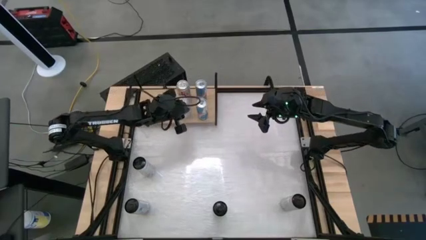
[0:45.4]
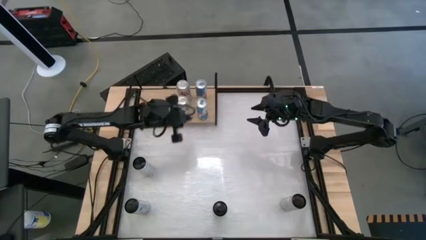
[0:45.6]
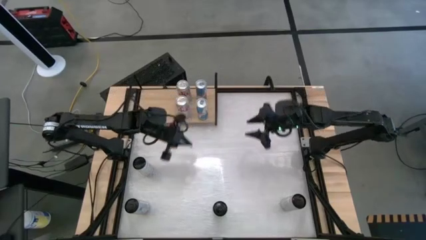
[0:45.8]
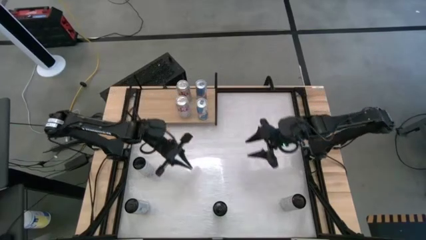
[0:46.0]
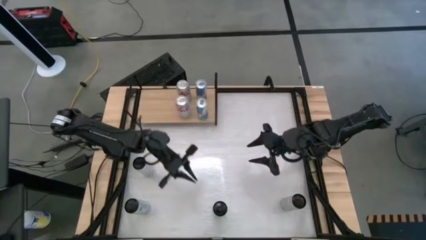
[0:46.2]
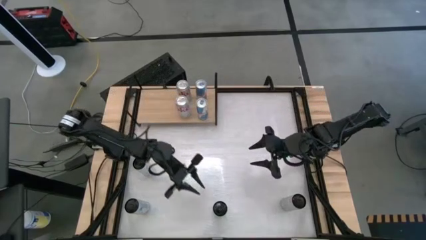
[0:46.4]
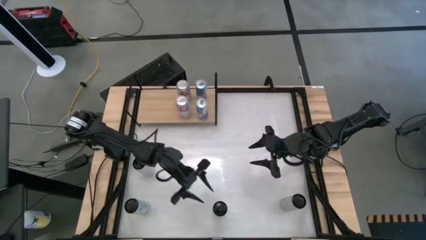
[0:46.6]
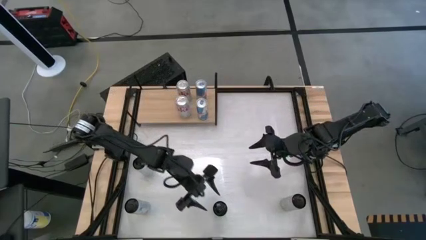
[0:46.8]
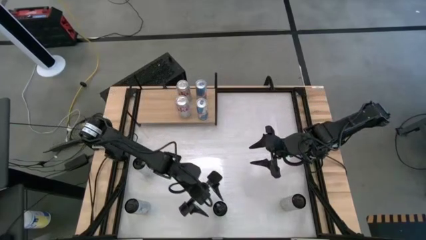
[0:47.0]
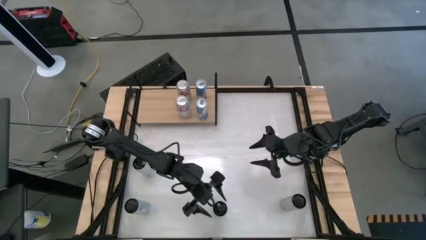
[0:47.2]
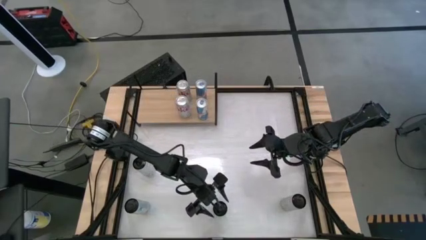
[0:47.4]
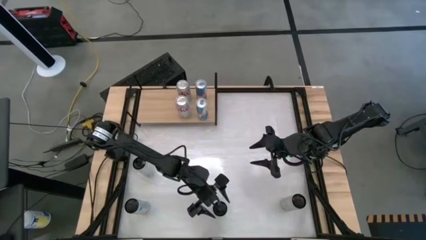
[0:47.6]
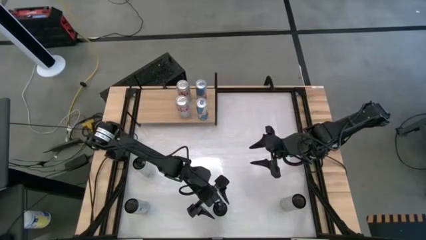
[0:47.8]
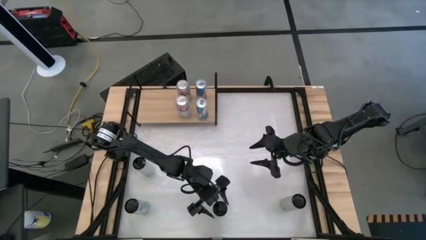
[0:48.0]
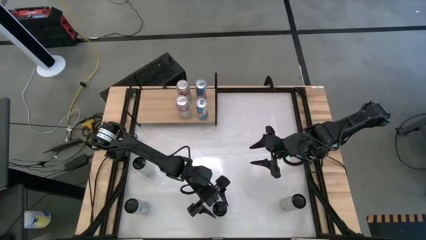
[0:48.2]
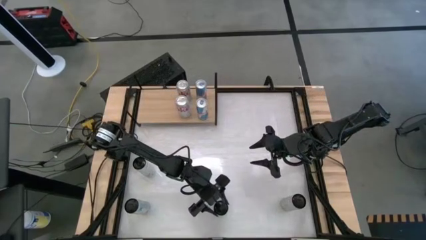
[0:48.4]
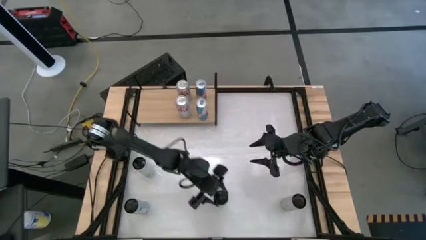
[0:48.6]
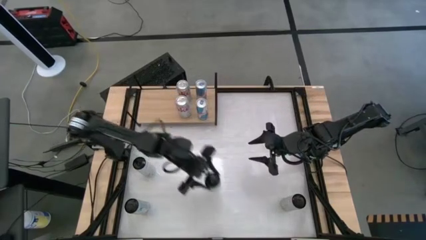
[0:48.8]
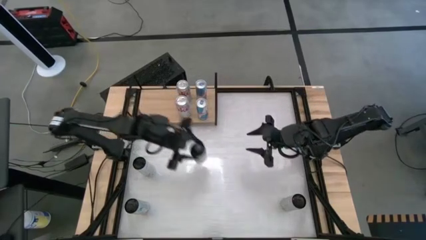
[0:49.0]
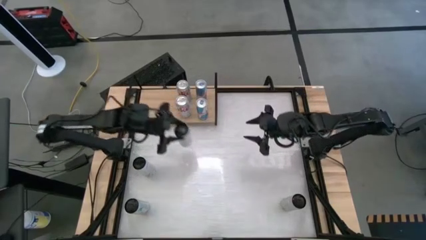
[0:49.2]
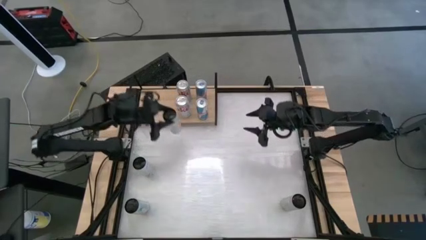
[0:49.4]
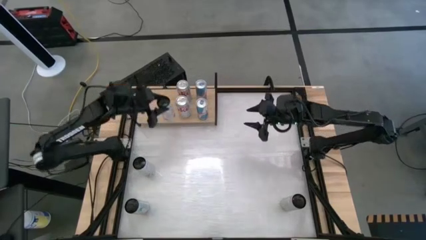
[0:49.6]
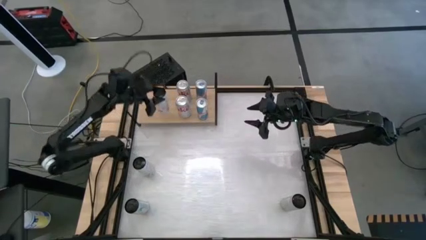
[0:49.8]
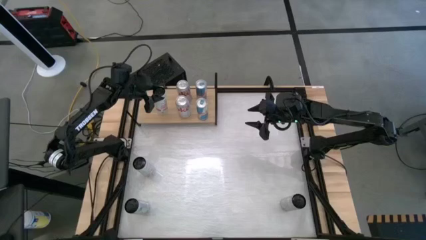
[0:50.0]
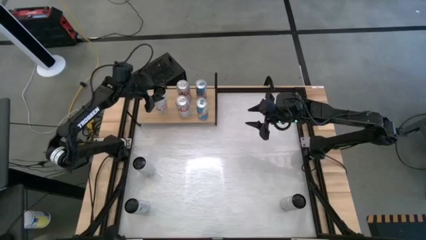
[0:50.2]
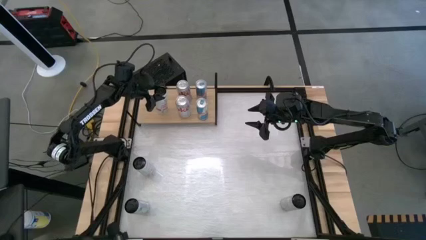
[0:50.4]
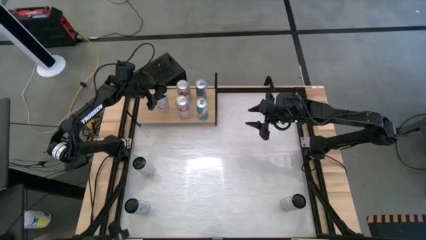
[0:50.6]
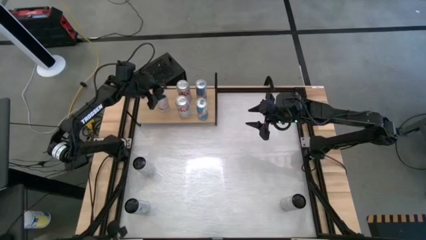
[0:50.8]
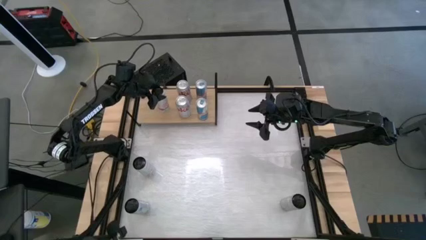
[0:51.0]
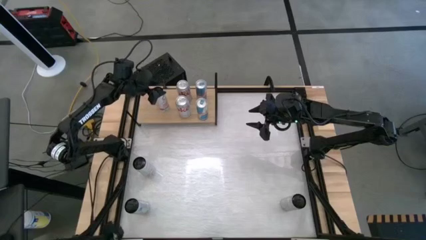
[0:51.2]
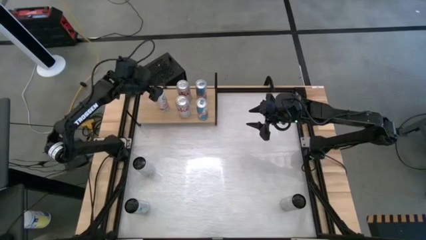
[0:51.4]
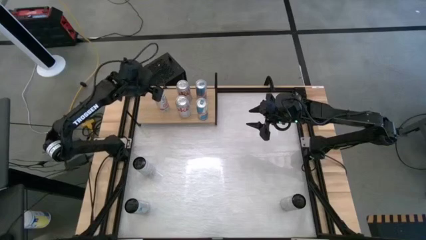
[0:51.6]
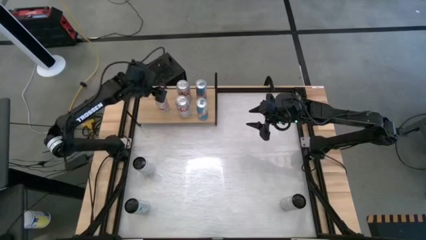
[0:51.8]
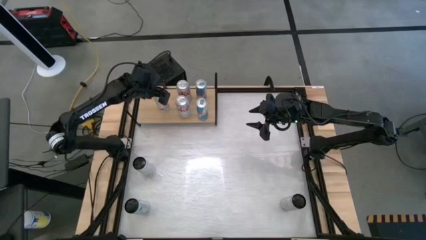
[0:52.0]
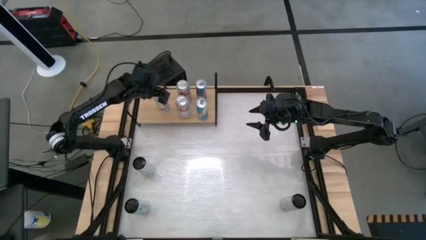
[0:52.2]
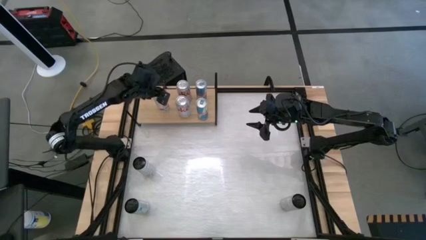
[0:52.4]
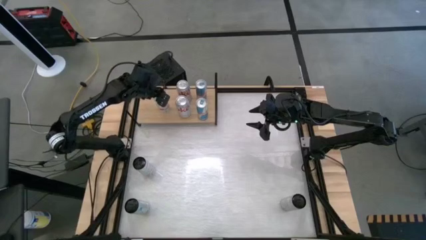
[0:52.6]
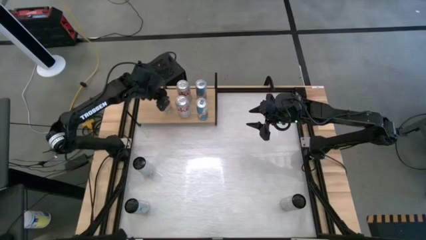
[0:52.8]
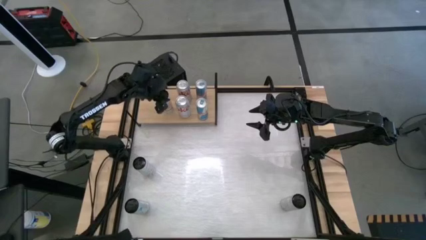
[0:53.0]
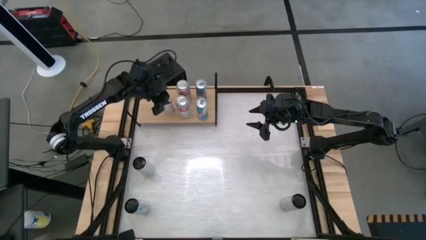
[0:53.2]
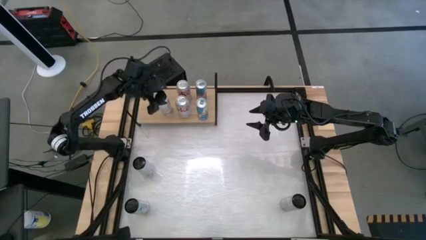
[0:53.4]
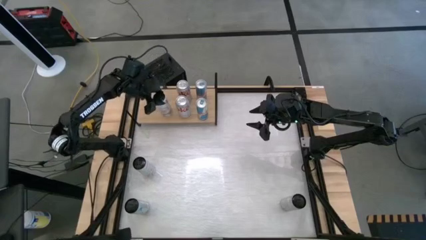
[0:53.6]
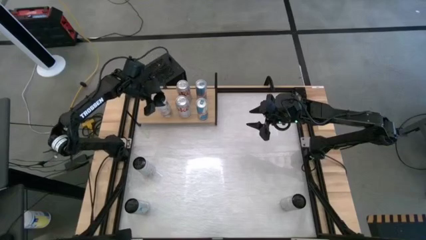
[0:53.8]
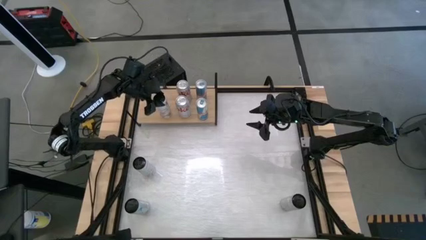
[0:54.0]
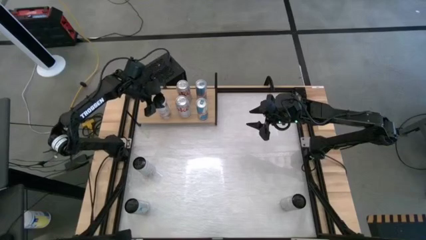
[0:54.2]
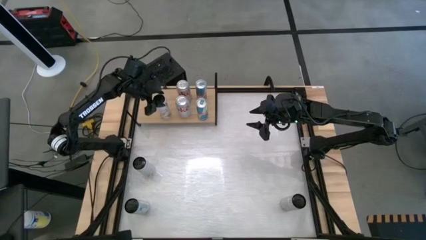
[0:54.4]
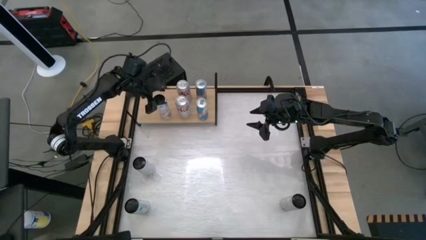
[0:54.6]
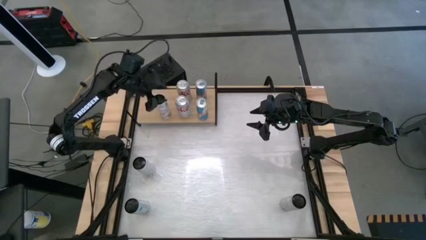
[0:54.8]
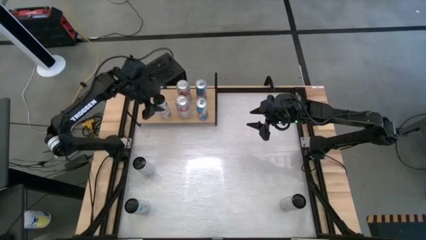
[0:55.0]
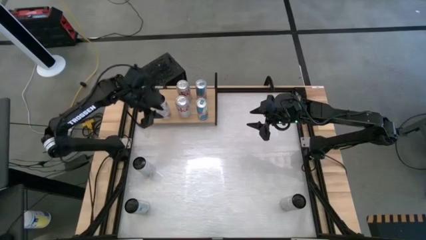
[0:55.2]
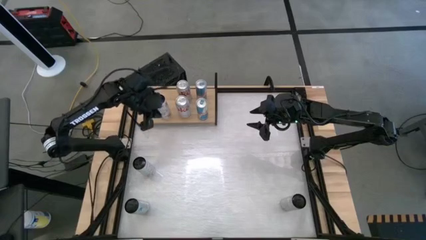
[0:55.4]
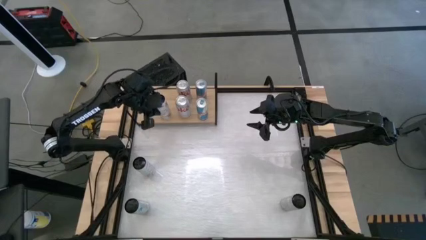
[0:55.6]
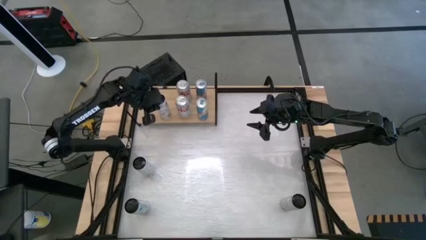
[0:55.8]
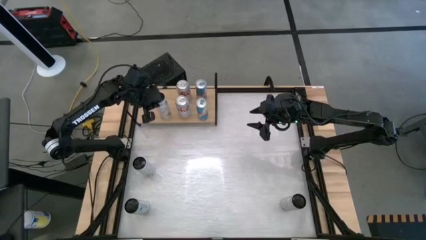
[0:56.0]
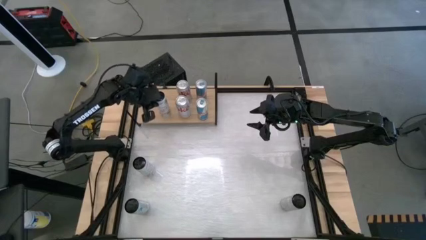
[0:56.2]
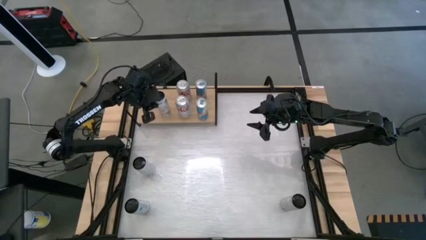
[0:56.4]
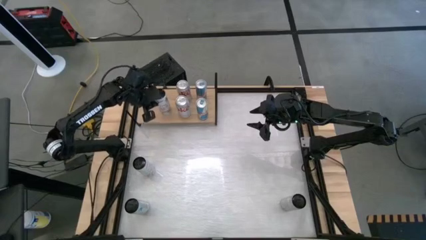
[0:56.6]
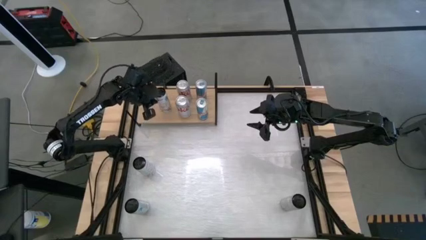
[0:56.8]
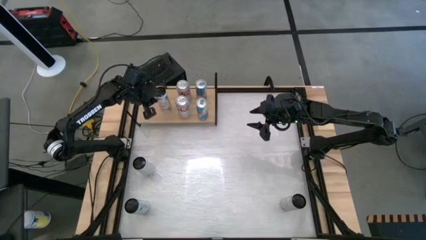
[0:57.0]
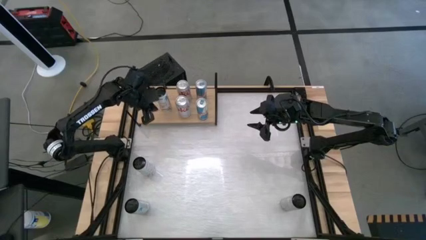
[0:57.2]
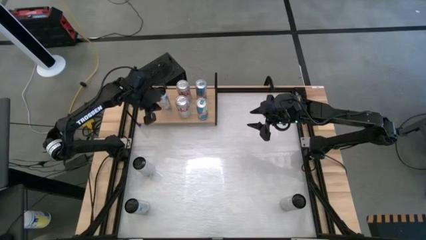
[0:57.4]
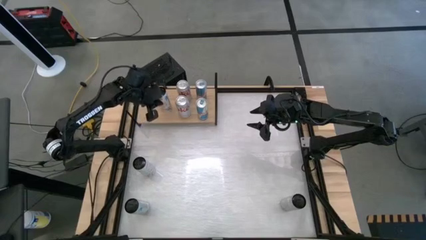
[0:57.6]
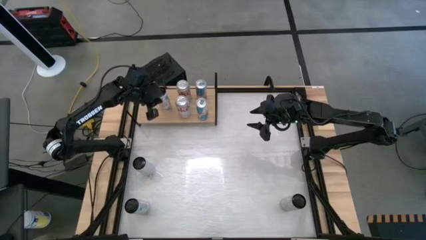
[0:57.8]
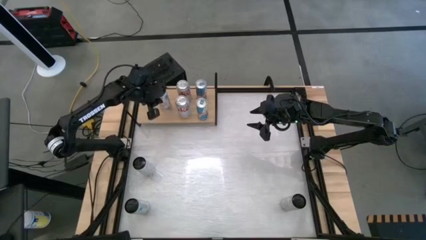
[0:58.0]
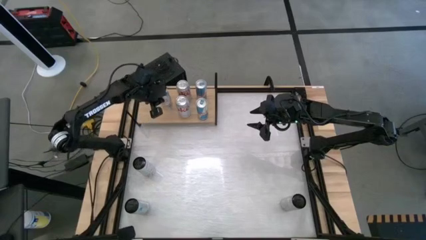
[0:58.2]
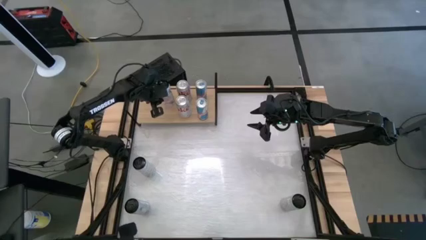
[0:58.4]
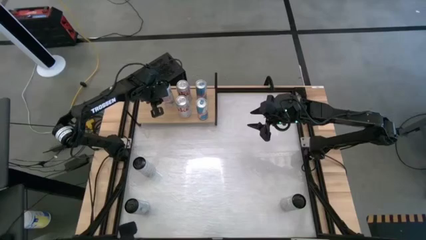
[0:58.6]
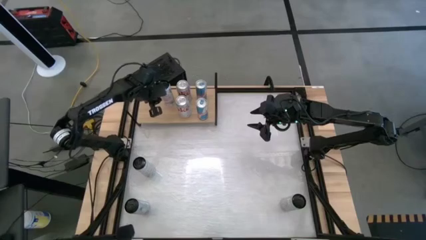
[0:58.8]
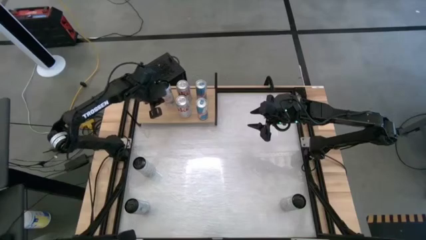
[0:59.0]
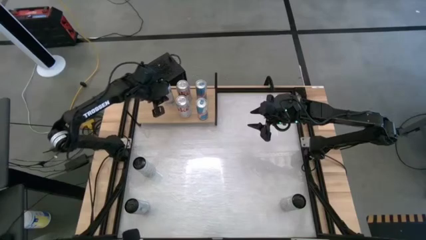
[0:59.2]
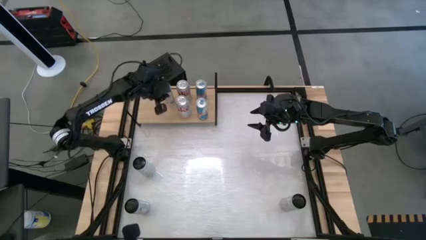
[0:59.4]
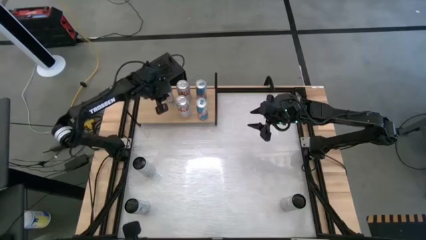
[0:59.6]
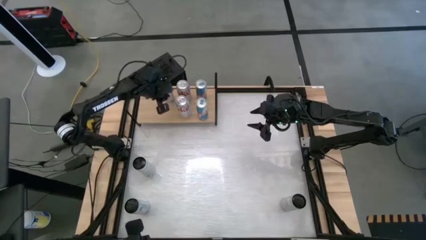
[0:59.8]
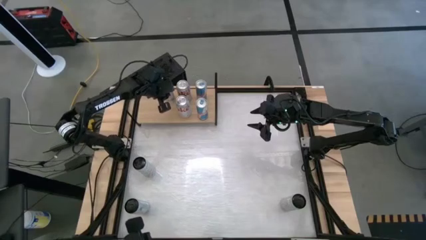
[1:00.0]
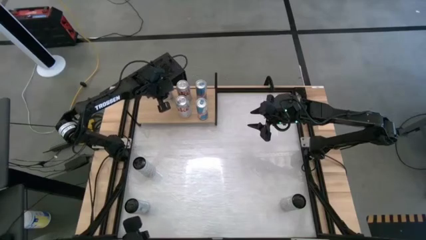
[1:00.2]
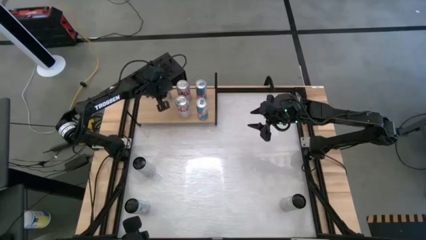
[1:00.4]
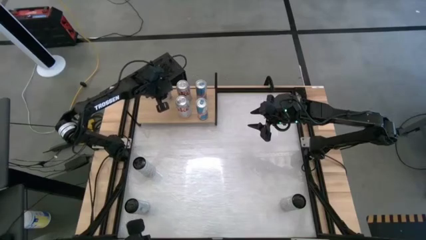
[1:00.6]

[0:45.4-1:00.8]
Task: Place canned beverage on shelf
Put the bottom center white soda can on the shelf
